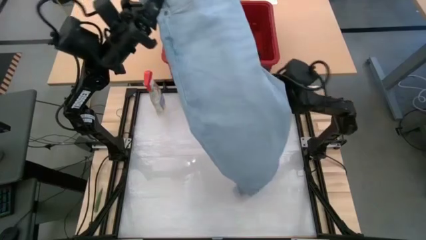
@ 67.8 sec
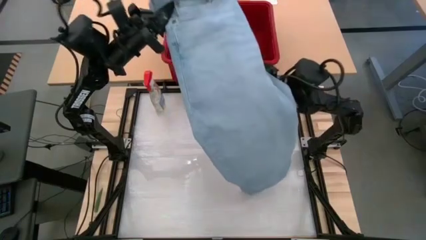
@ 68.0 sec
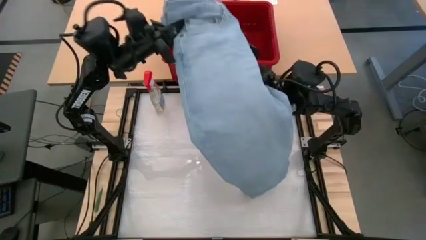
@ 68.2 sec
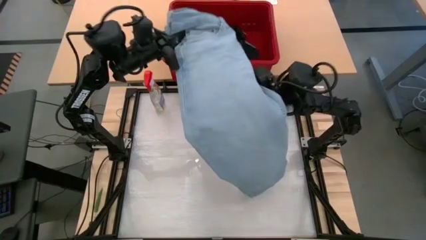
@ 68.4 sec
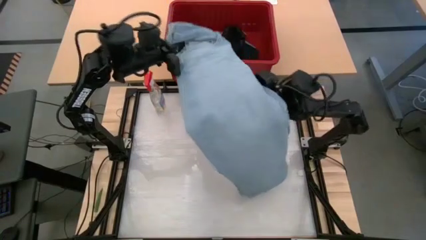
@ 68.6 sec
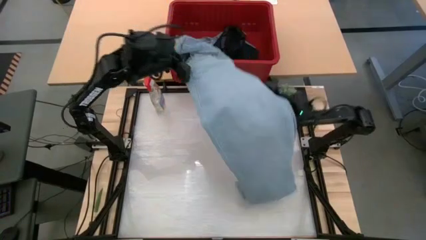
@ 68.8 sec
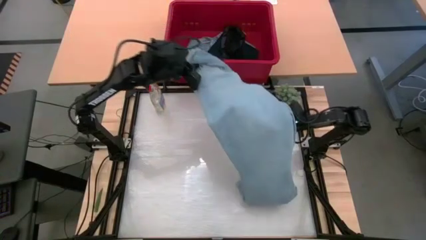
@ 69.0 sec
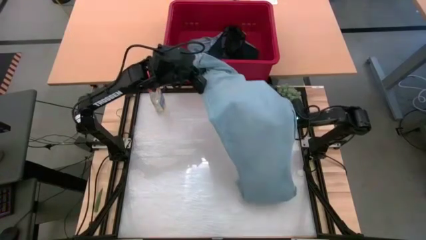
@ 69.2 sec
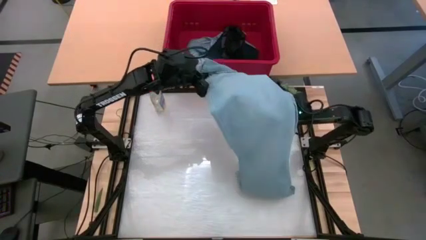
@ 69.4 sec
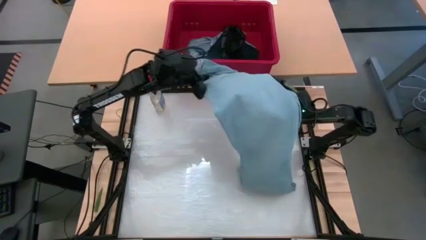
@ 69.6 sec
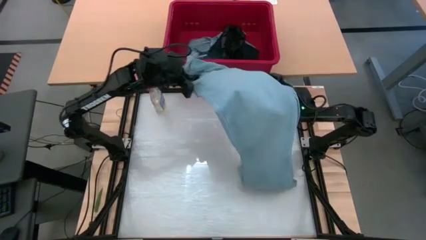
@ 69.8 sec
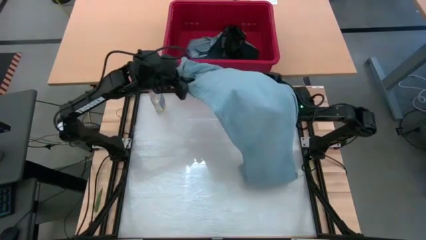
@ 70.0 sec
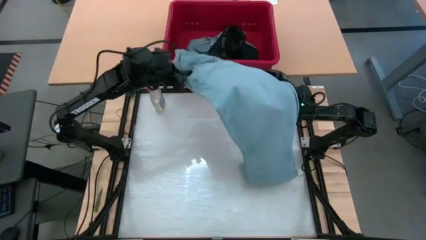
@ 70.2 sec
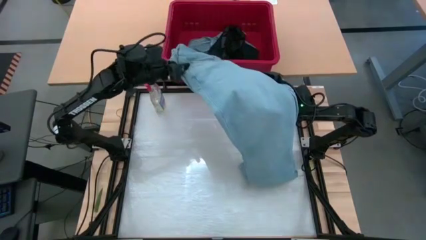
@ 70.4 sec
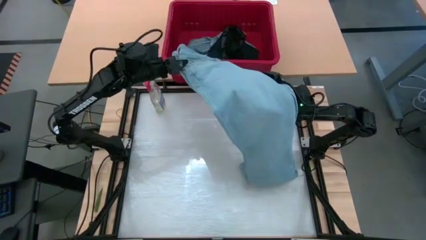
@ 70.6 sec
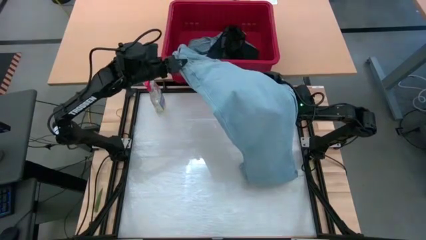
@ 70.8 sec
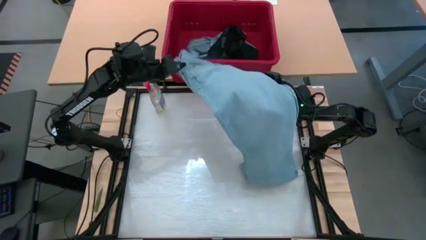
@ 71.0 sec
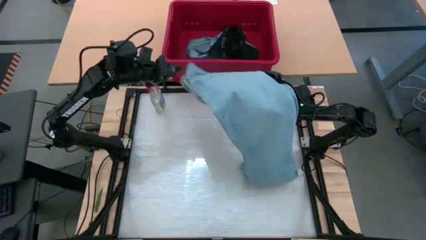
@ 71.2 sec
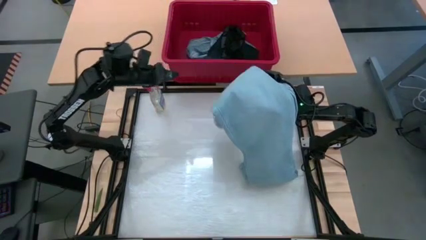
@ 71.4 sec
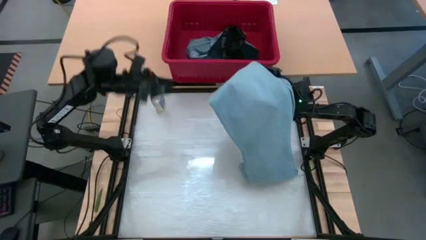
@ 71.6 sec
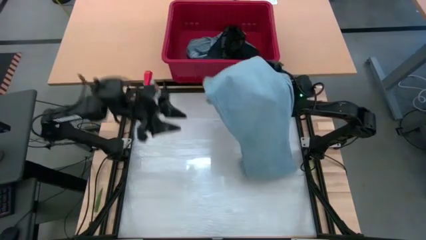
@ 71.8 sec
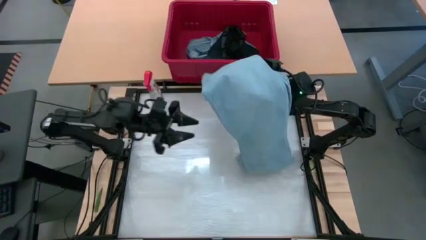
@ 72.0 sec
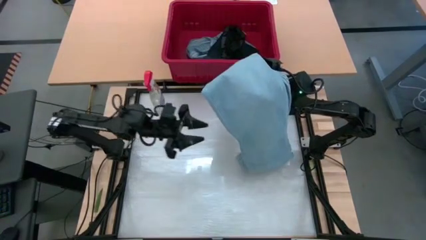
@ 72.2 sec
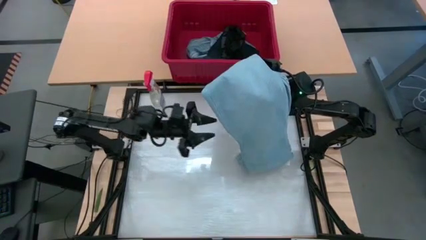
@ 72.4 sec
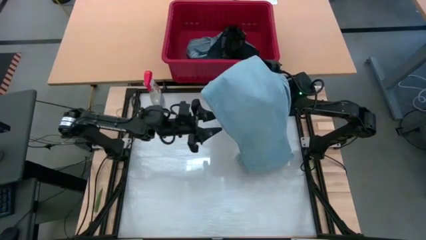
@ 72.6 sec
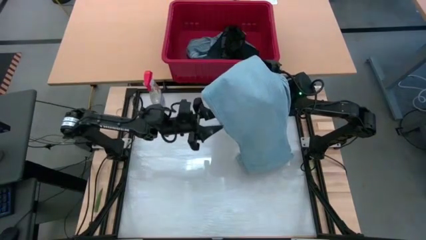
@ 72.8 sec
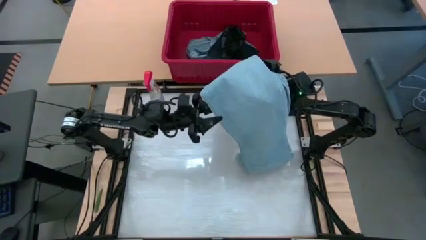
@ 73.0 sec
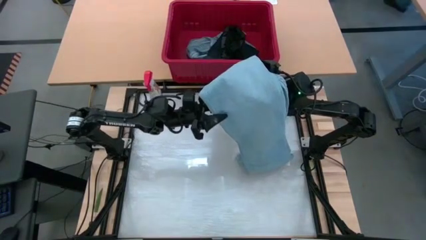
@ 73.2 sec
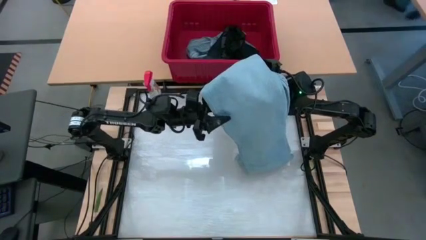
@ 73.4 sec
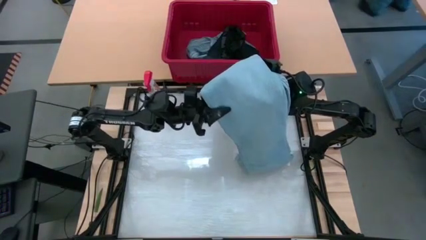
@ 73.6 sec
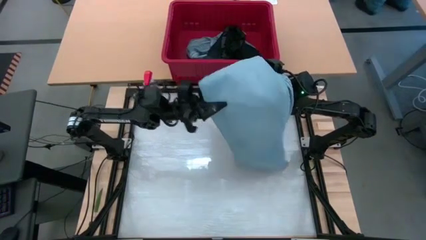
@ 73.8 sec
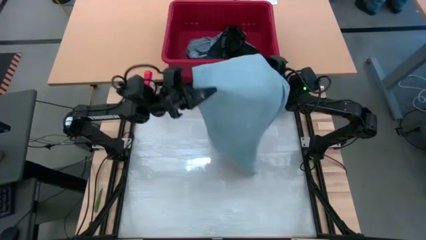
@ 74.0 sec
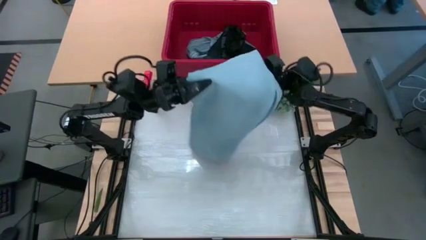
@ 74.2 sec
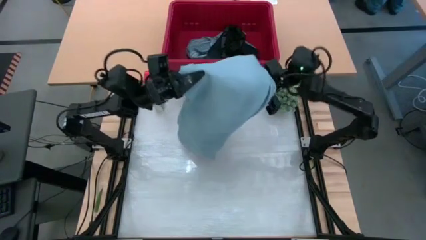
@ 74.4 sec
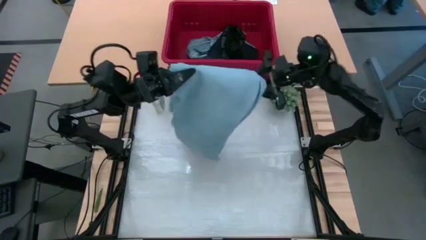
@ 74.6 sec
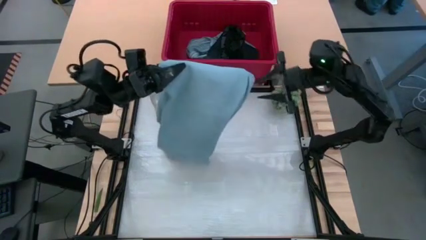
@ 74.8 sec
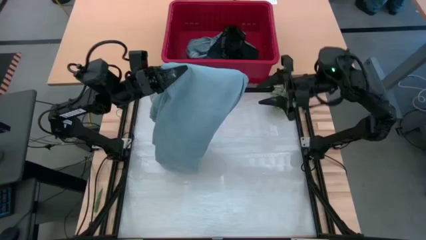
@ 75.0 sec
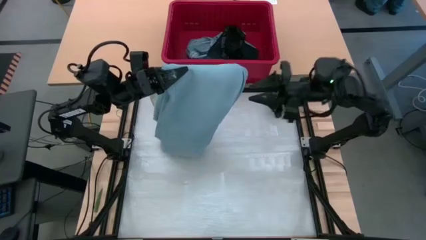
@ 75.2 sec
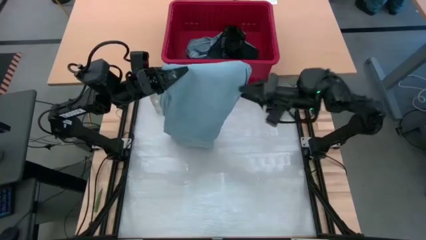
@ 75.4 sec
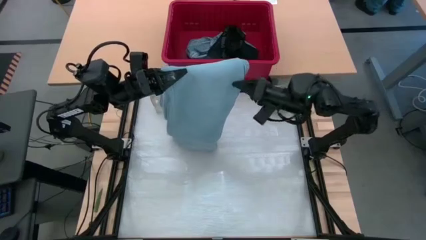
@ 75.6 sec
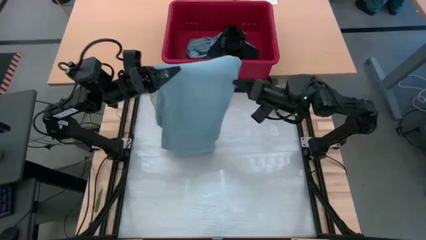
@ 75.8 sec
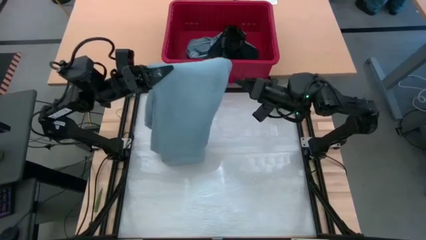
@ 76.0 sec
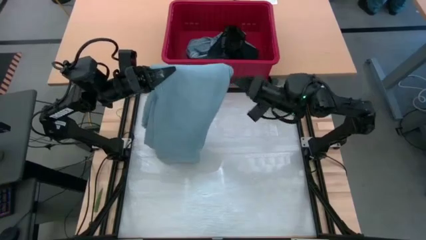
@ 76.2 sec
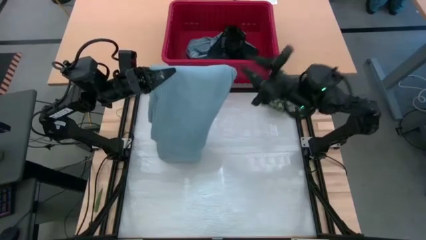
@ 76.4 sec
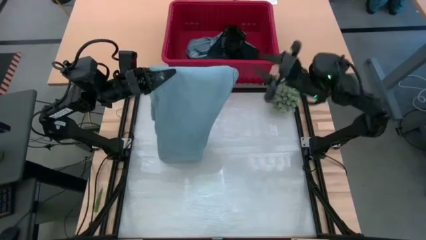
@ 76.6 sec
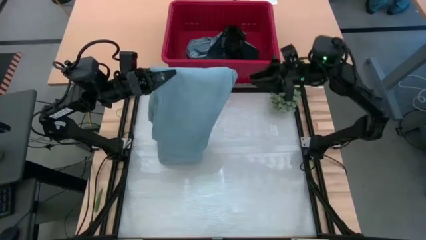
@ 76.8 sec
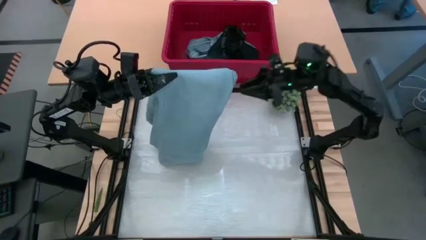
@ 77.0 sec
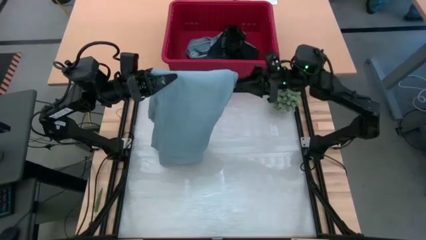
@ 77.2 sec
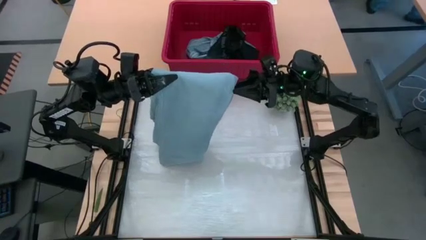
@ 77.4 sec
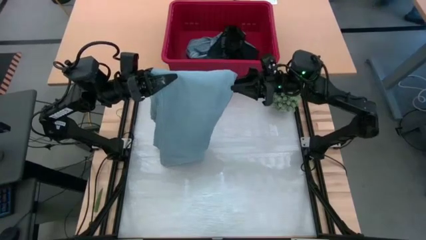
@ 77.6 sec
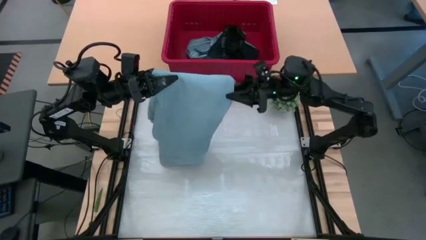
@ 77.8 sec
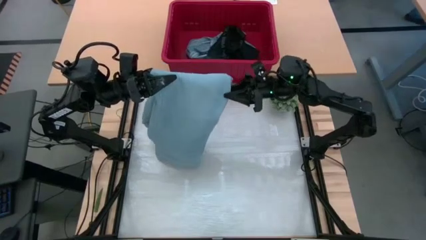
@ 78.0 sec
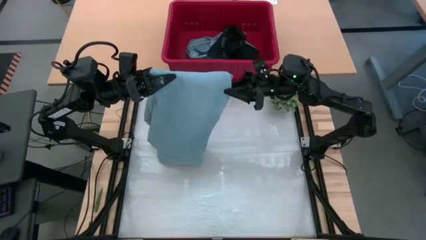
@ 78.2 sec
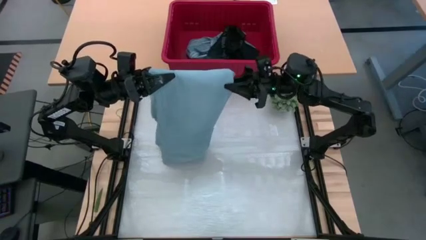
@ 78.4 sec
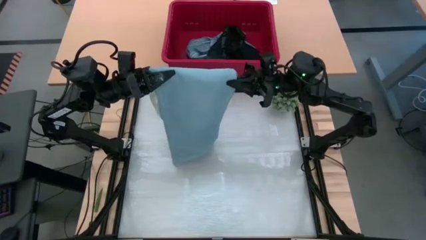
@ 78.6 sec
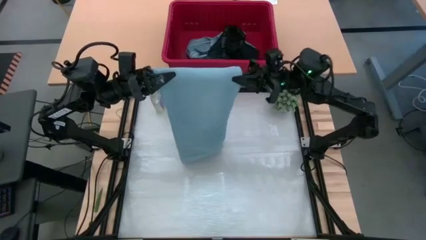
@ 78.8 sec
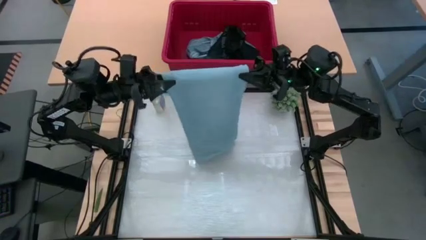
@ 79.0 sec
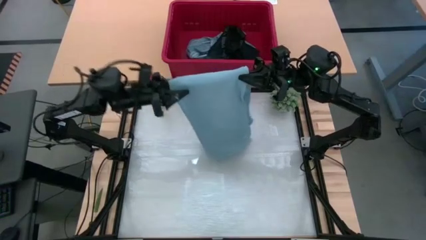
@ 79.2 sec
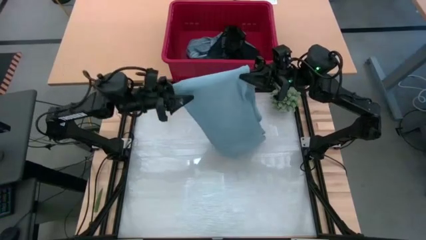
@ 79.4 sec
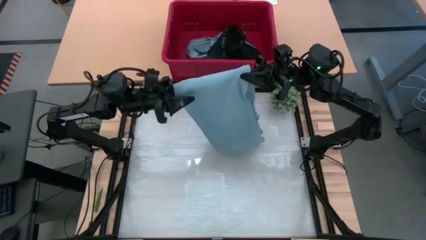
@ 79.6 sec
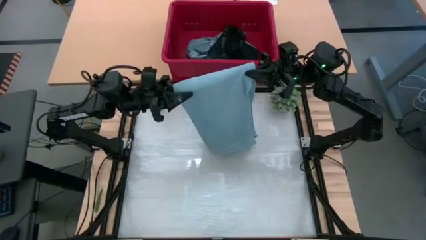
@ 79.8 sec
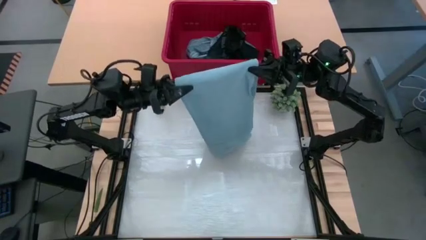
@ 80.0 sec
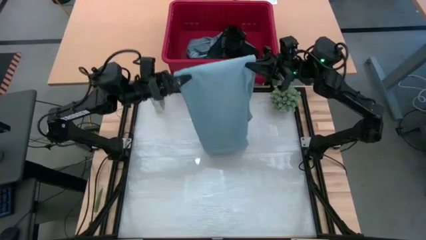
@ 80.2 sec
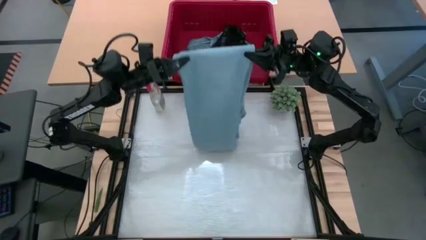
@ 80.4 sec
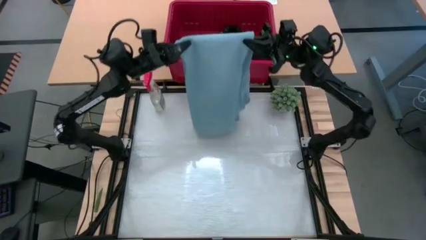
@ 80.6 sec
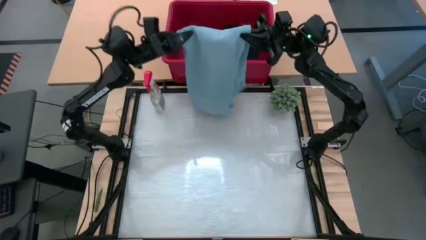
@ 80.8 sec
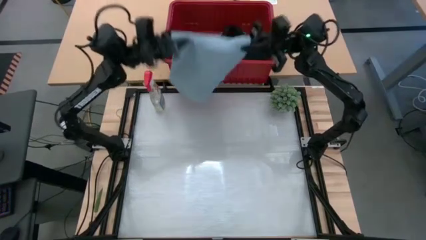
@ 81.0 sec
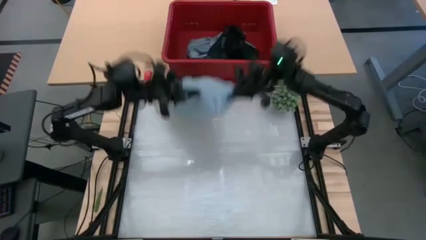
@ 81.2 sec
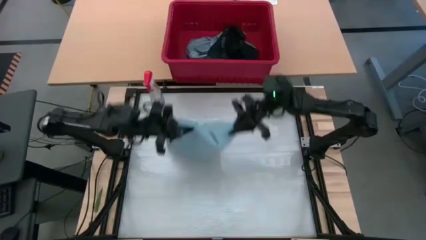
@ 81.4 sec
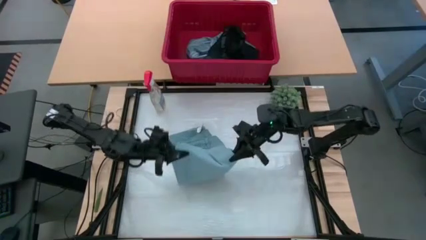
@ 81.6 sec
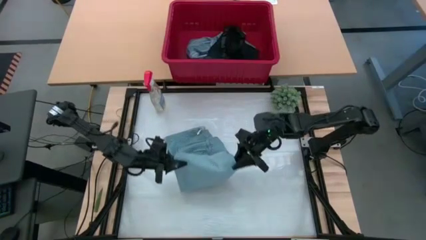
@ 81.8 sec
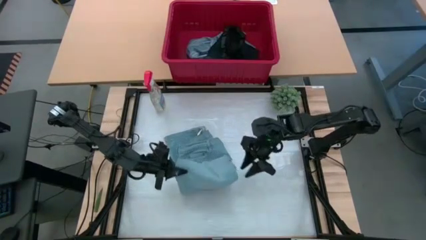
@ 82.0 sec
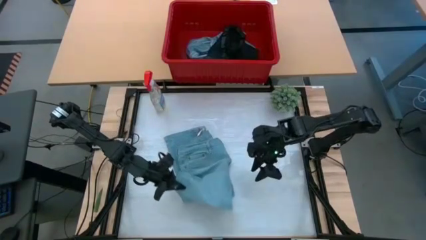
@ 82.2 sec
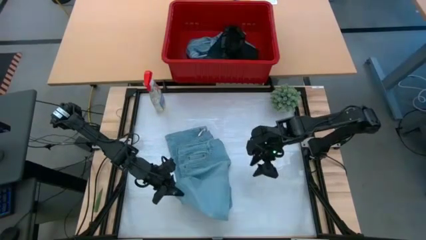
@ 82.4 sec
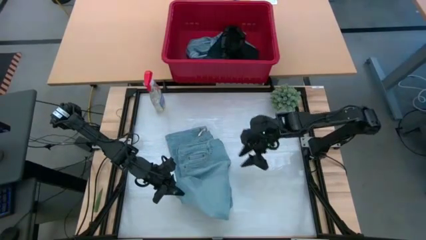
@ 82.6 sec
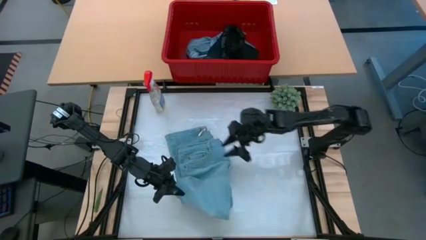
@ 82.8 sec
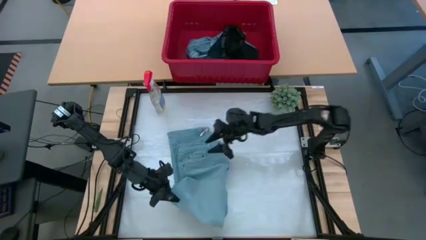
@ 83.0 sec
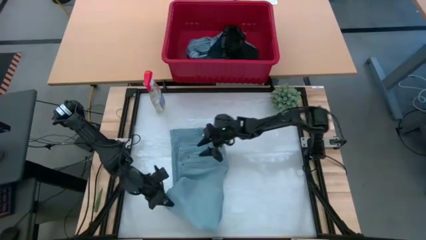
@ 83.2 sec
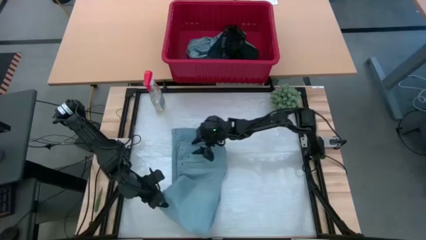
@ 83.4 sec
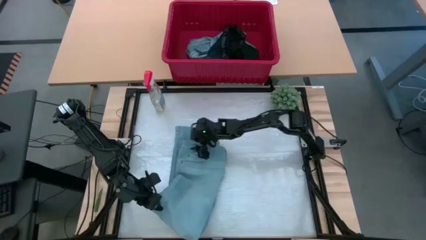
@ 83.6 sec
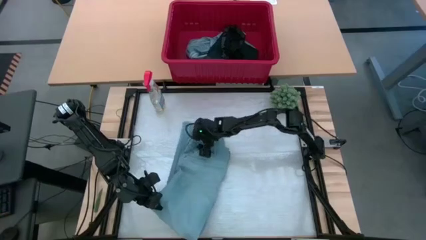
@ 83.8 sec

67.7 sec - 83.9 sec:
Task: Fold Laundry from Bin
Fold the blue pants from the red laundry bin
